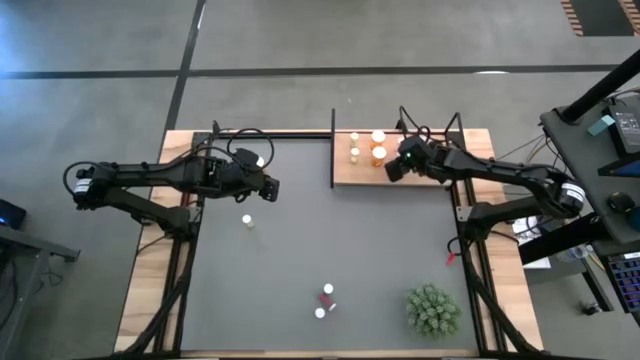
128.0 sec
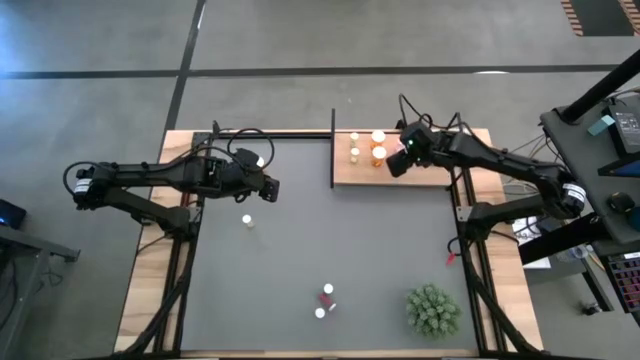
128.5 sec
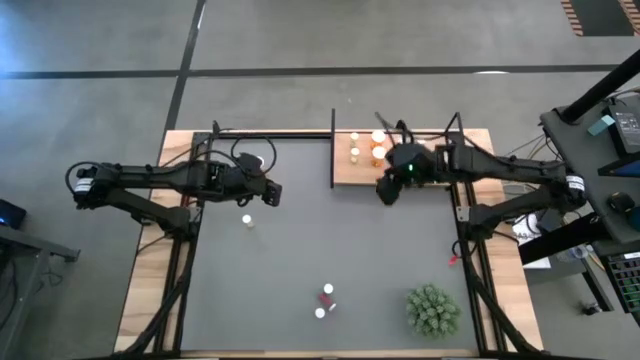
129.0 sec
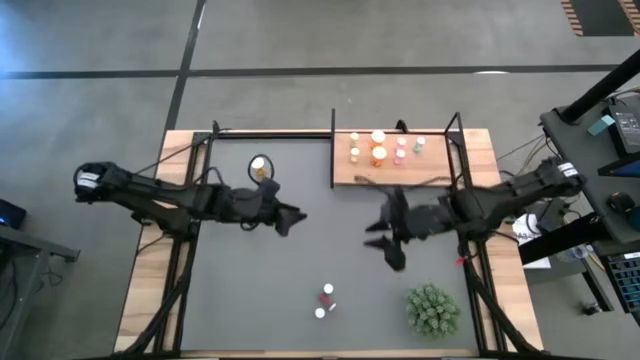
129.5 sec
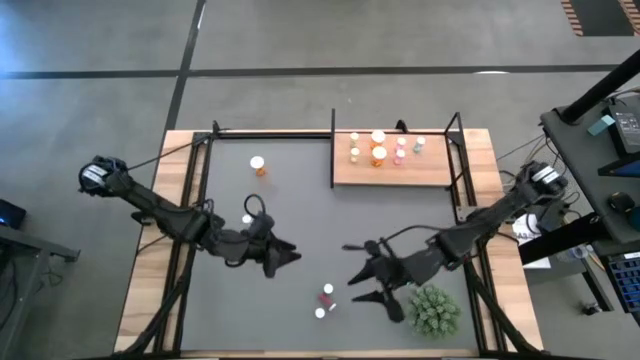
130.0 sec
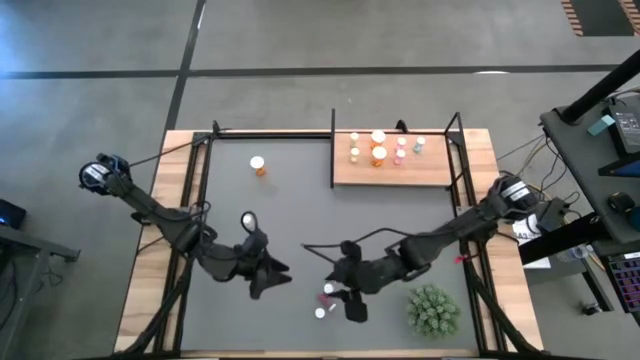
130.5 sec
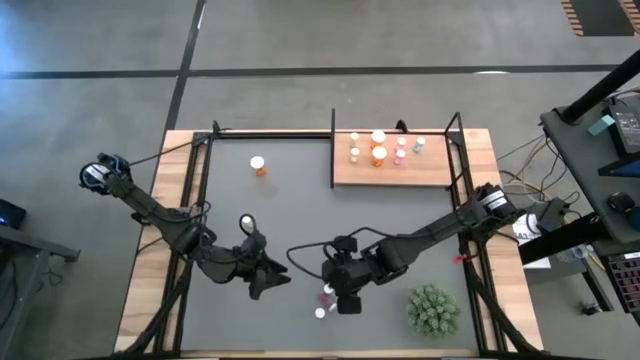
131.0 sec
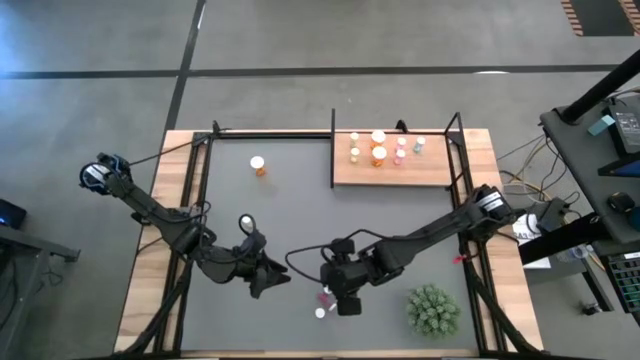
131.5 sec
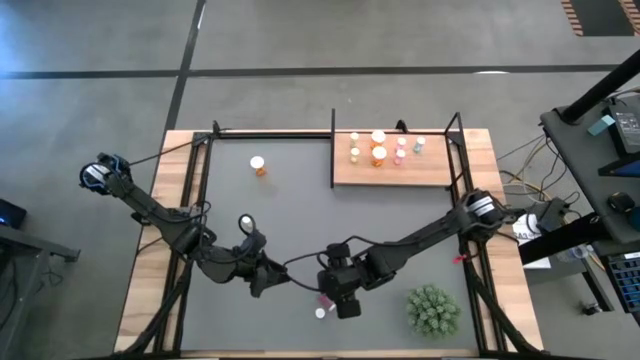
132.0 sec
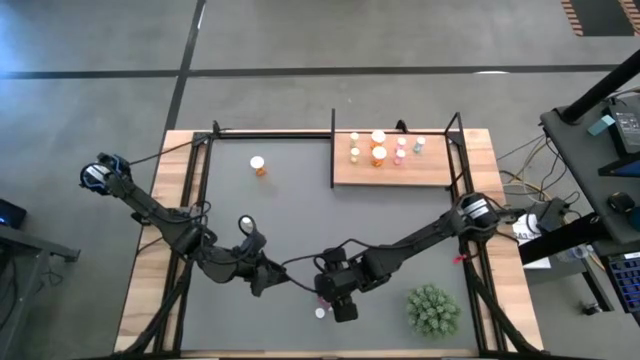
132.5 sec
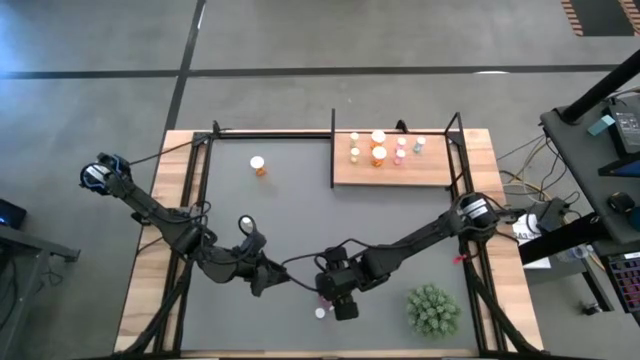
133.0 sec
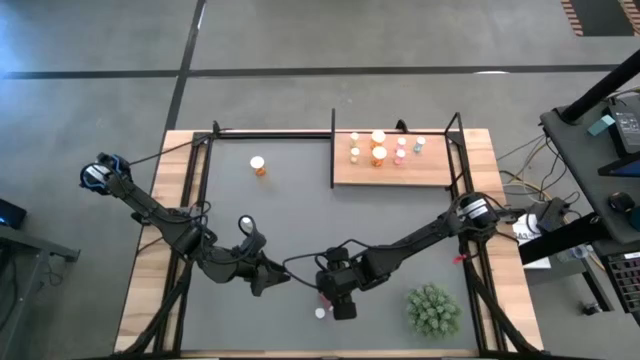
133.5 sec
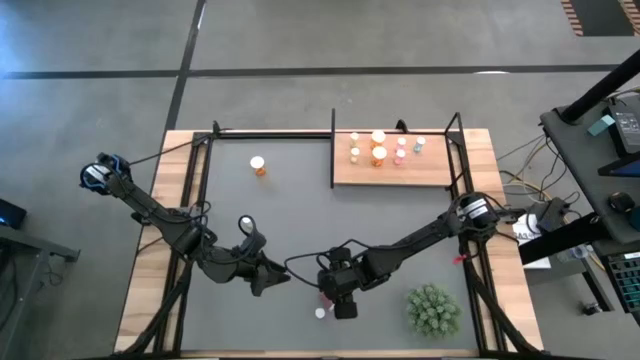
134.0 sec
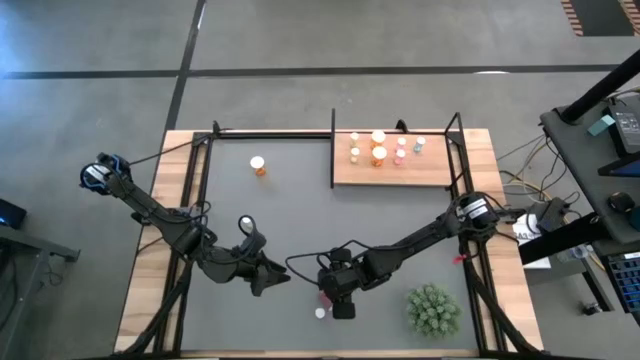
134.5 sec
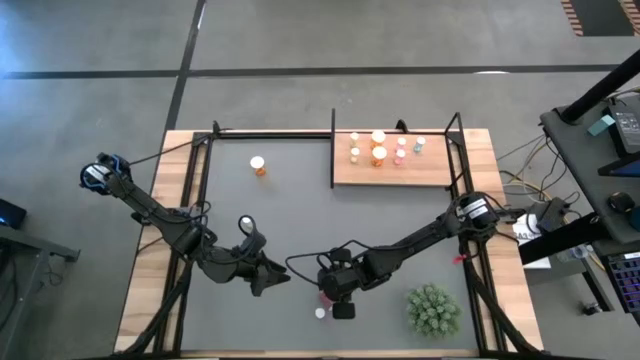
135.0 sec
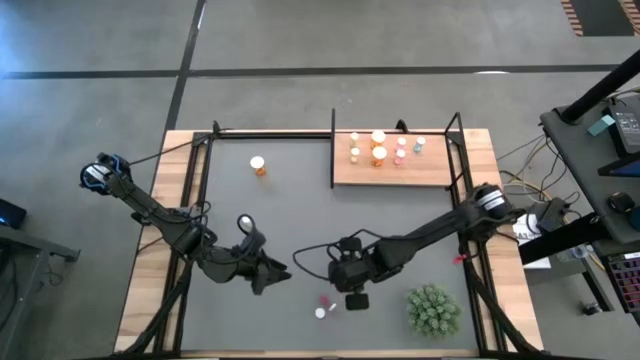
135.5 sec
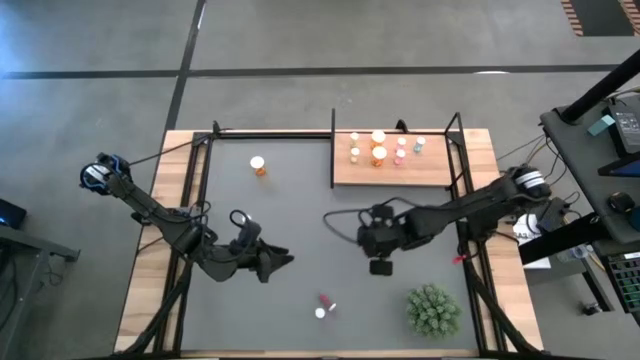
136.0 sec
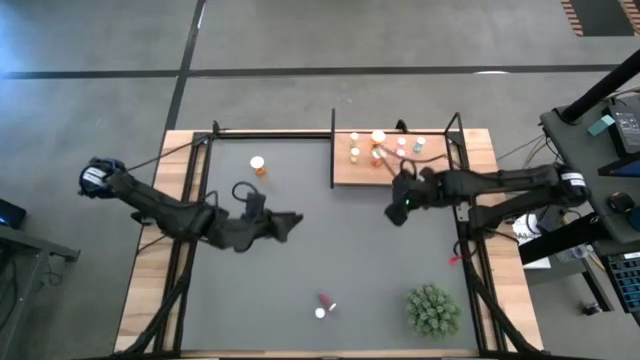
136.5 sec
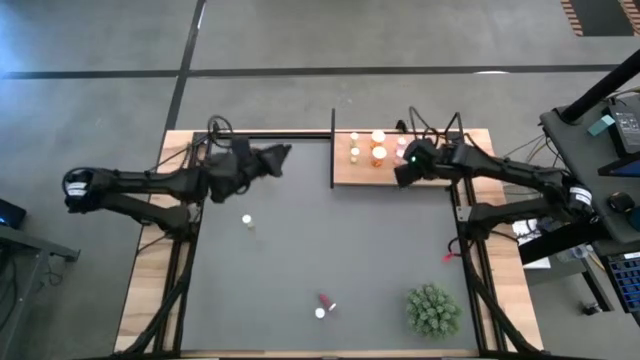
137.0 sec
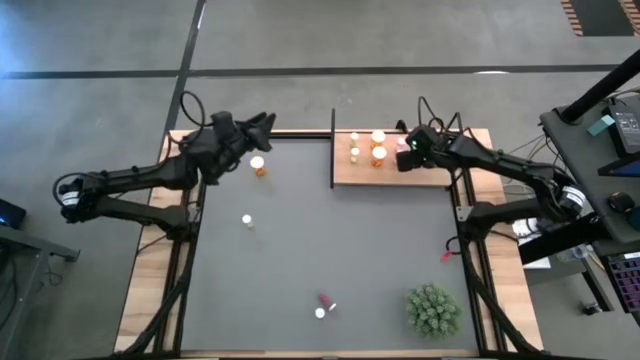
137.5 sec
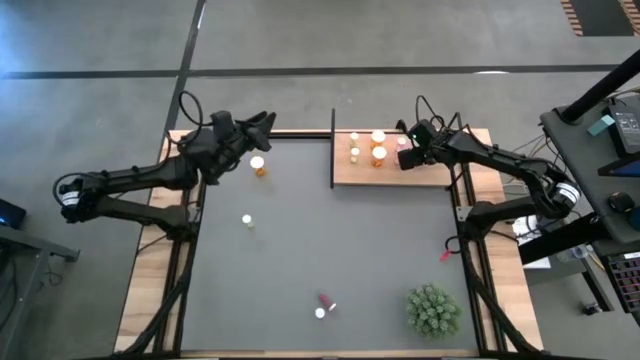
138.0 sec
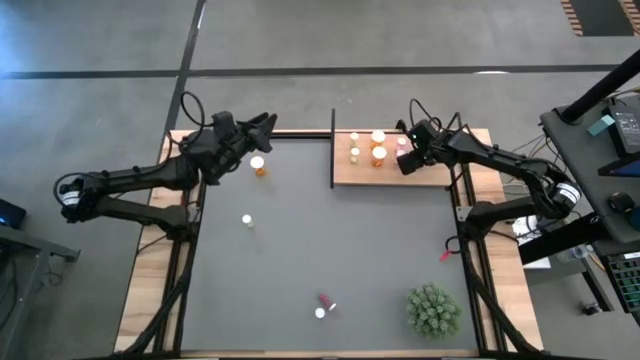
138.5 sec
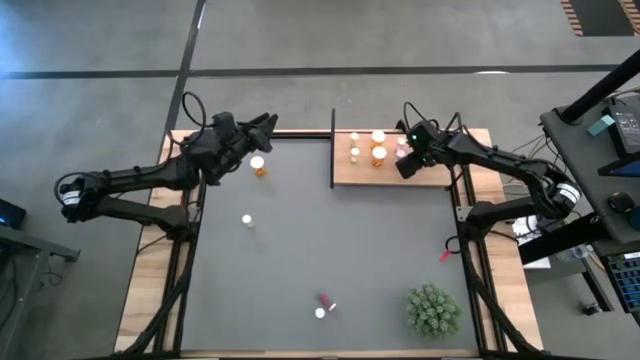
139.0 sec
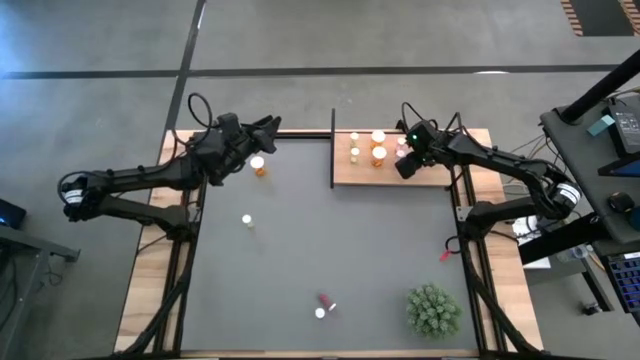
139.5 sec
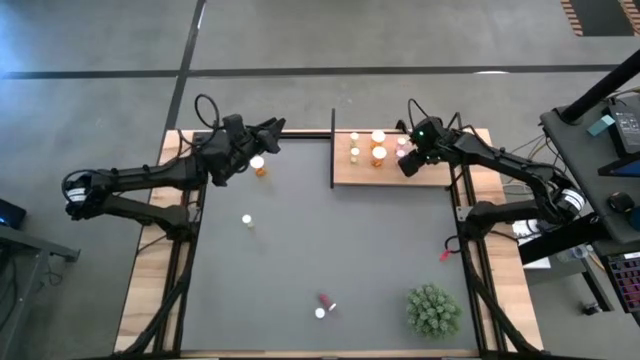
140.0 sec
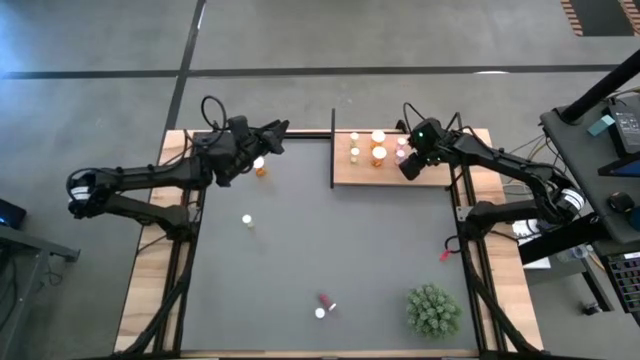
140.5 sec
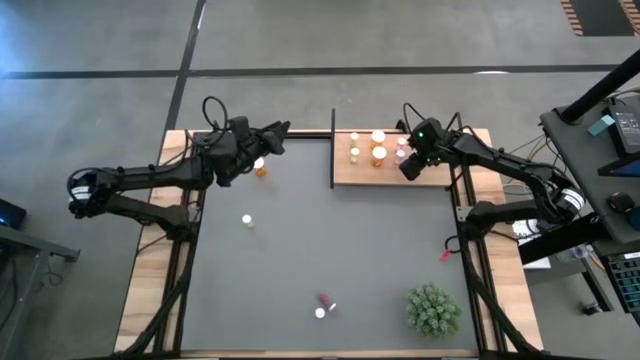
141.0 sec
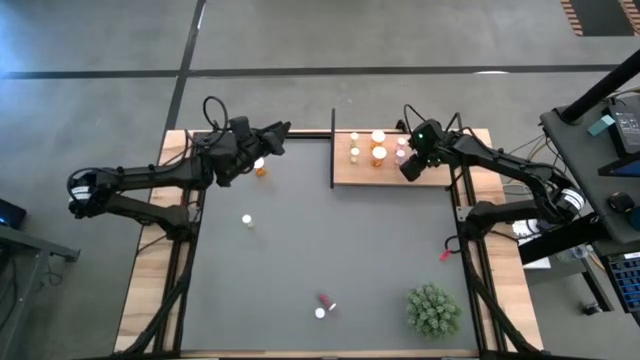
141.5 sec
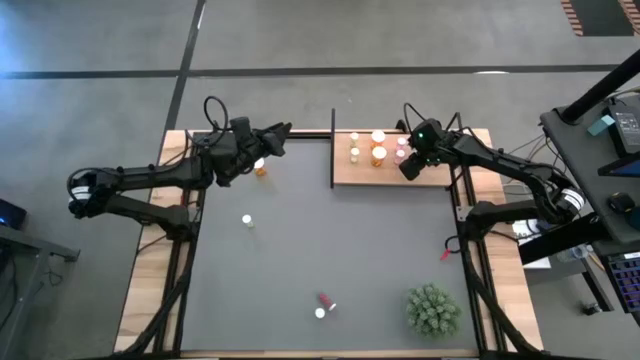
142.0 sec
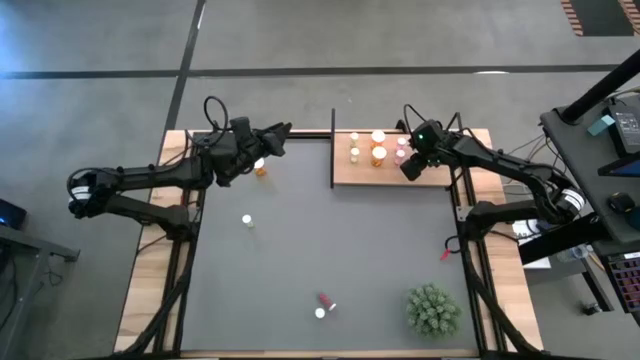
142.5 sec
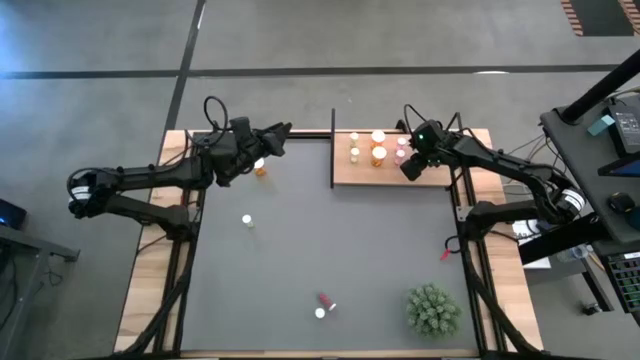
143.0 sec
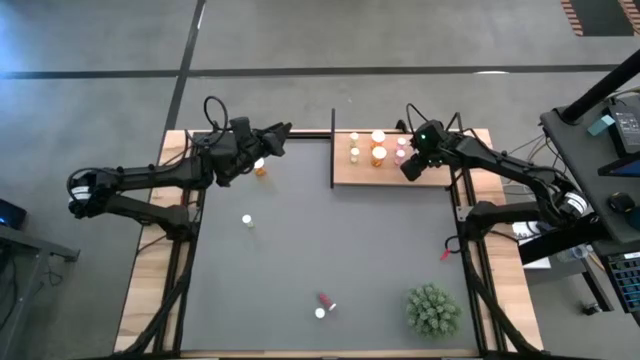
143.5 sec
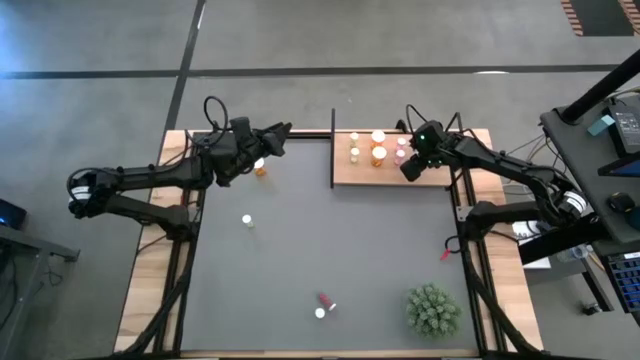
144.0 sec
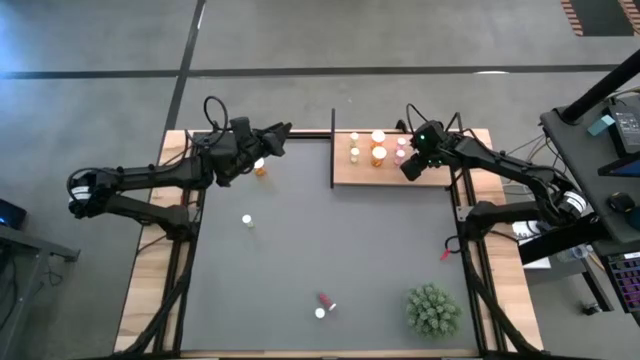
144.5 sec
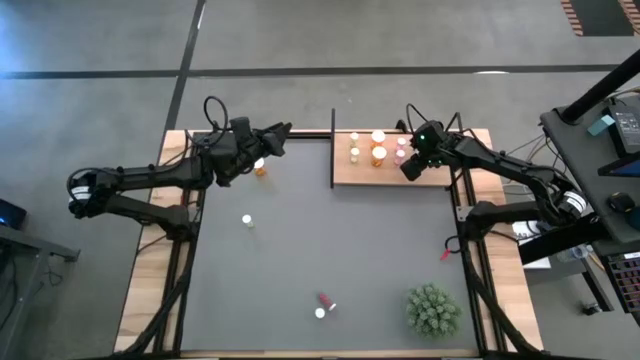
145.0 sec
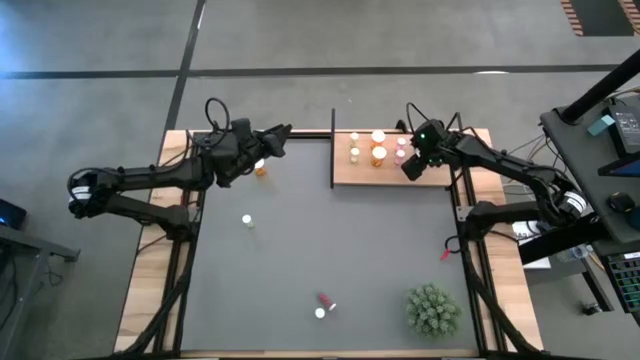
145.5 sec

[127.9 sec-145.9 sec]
Task: Pick and place medicine bottles onto shelf by color
Put the top blue medicine bottle on the shelf aligned with the other blue medicine bottle

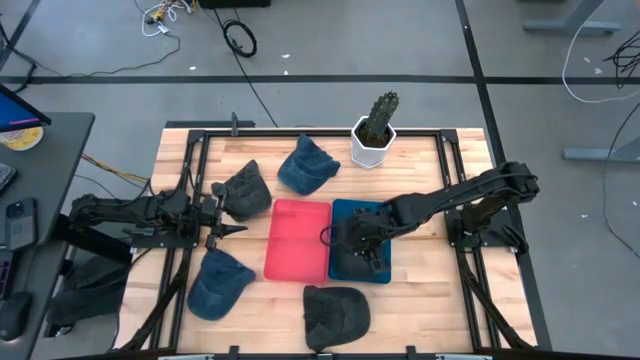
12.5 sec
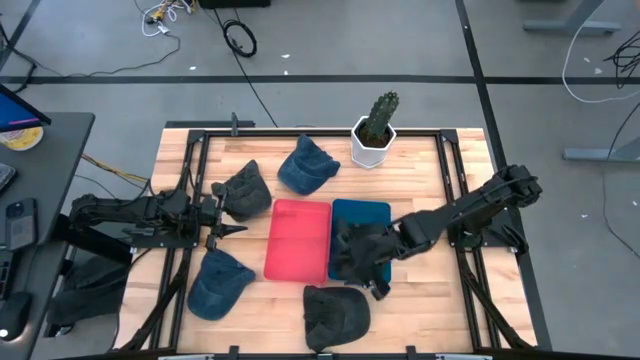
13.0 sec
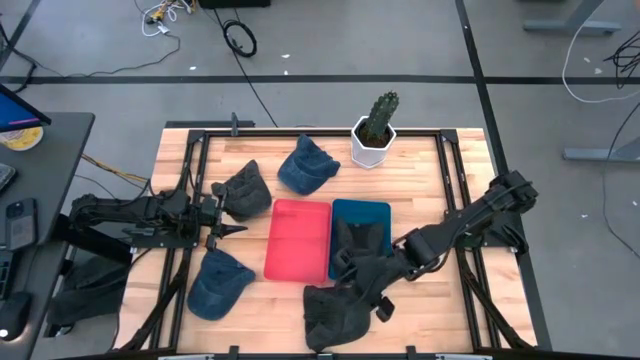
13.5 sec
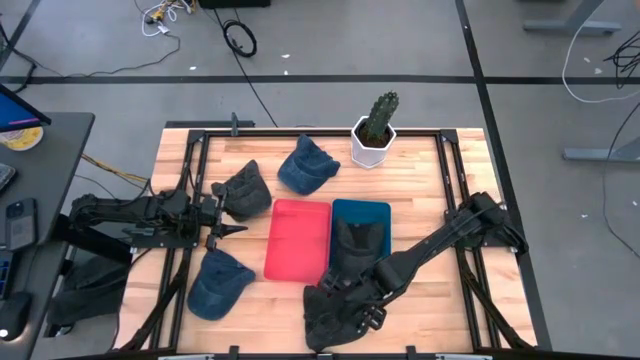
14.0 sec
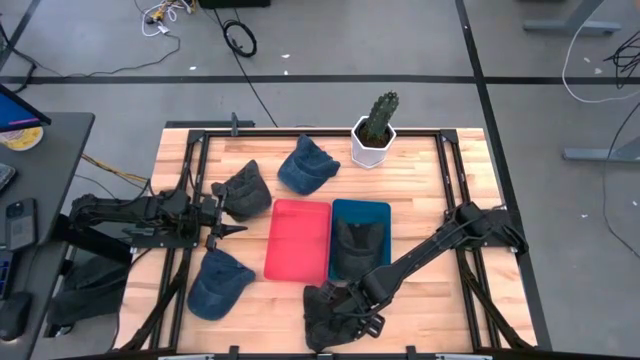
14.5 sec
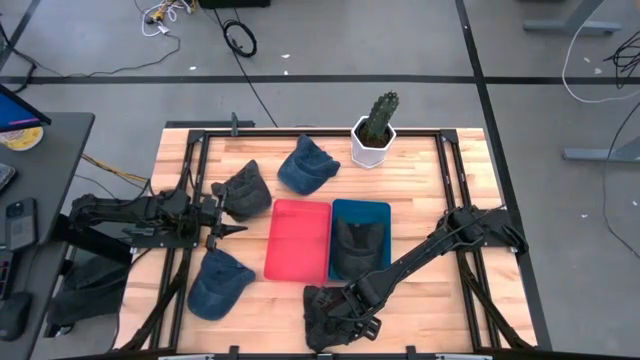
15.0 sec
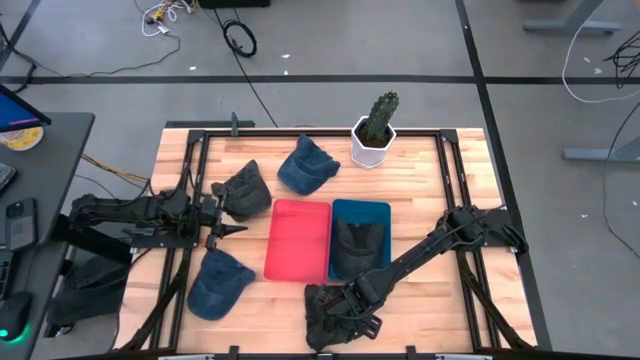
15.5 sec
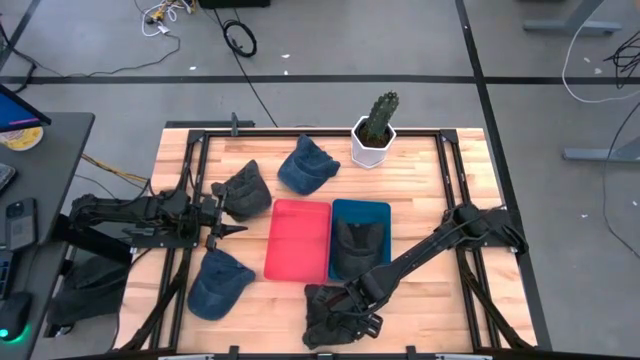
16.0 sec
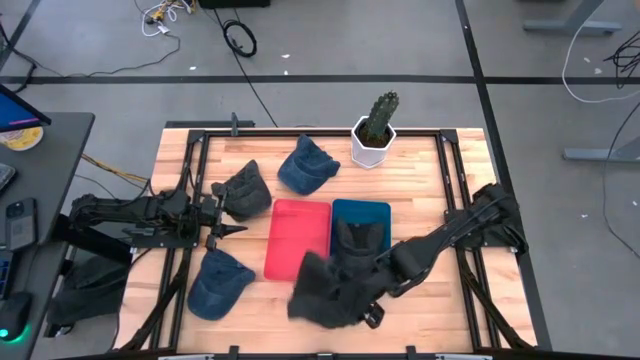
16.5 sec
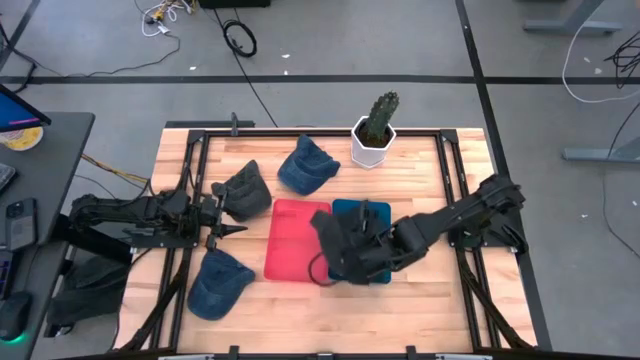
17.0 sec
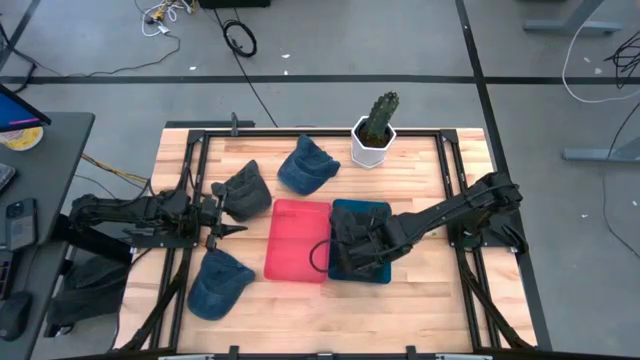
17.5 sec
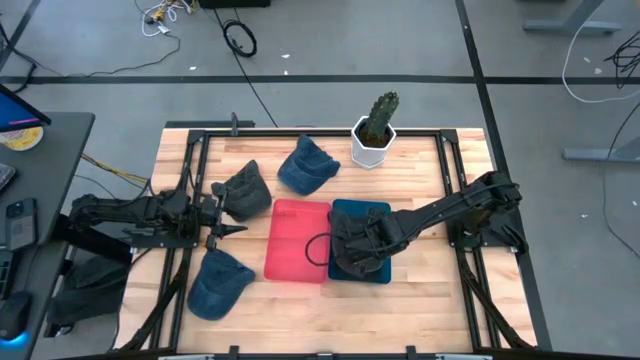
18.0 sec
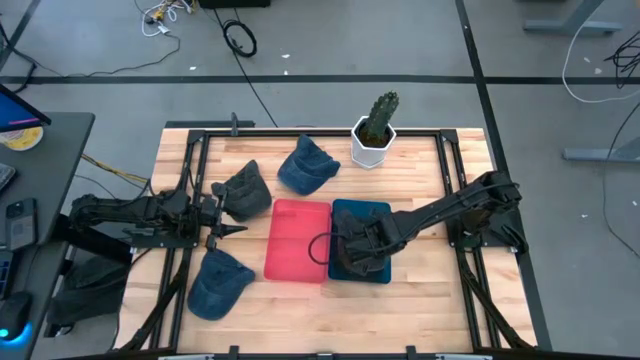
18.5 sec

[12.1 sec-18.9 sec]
Task: Pick & Place hat
Put the bottom black cap into the blue bin
